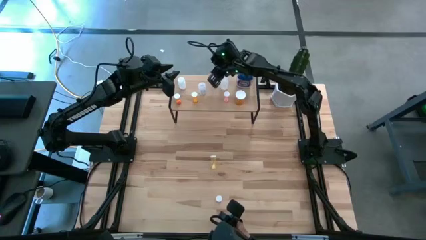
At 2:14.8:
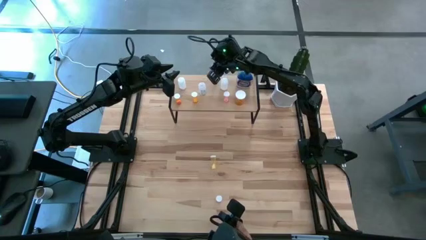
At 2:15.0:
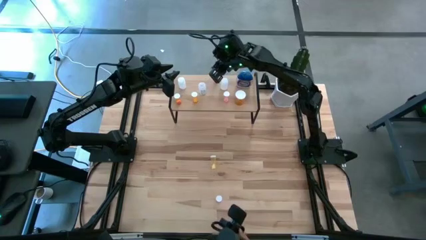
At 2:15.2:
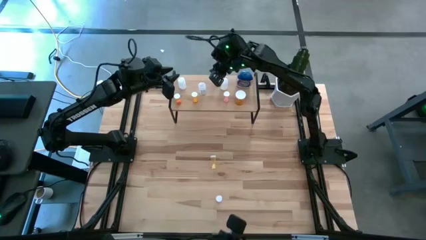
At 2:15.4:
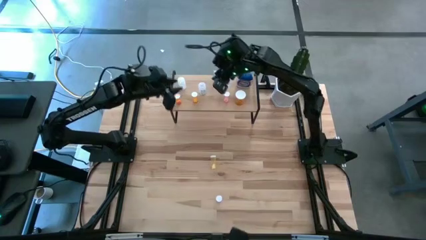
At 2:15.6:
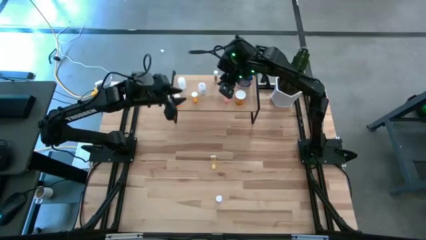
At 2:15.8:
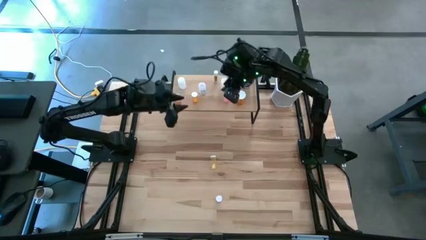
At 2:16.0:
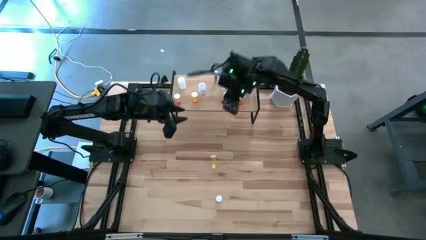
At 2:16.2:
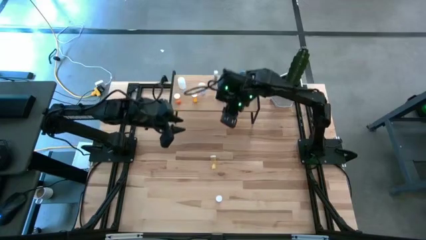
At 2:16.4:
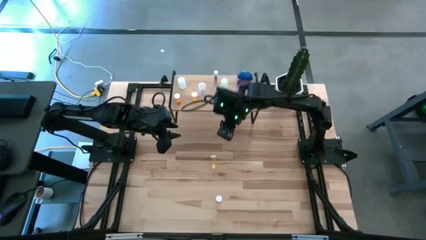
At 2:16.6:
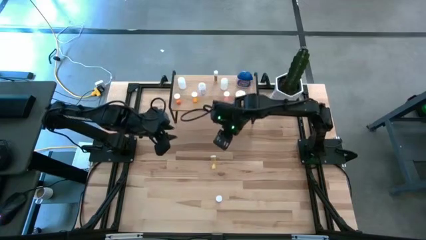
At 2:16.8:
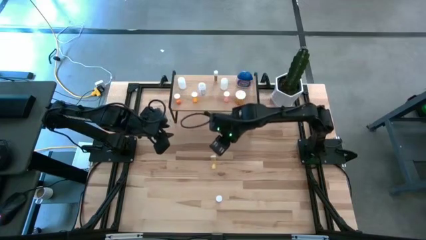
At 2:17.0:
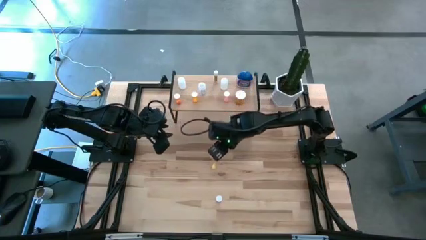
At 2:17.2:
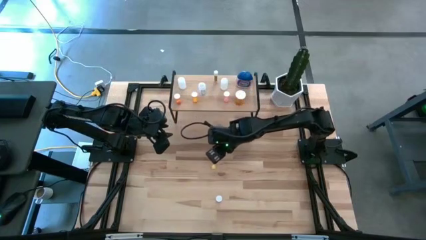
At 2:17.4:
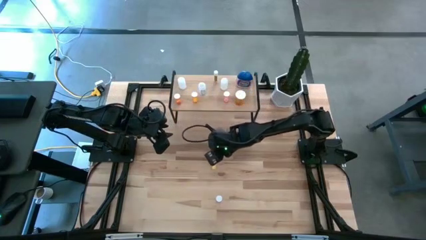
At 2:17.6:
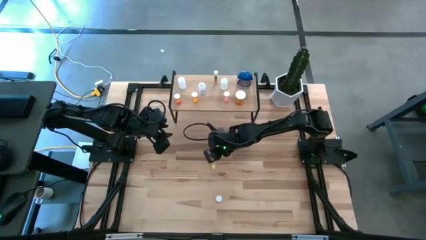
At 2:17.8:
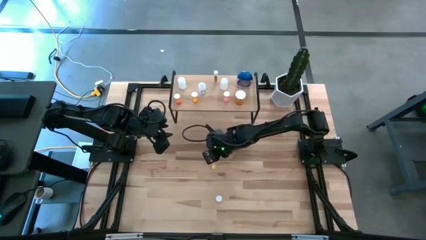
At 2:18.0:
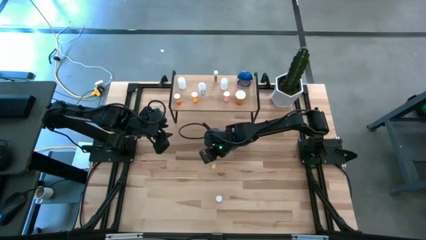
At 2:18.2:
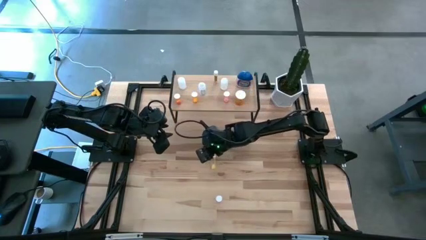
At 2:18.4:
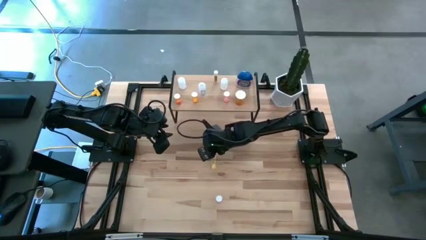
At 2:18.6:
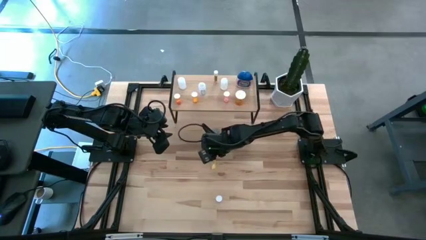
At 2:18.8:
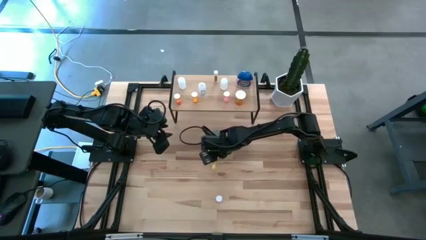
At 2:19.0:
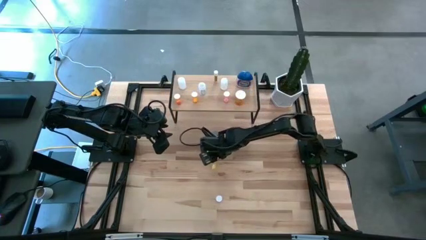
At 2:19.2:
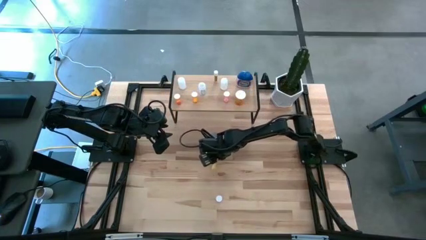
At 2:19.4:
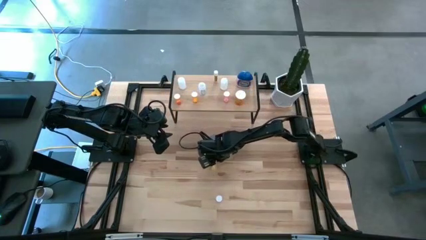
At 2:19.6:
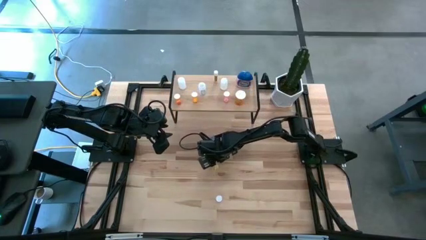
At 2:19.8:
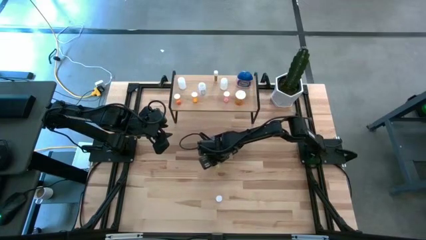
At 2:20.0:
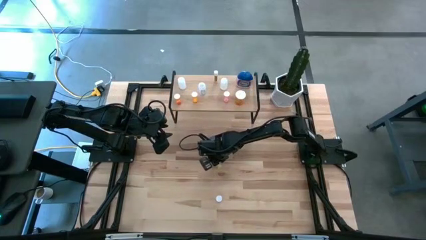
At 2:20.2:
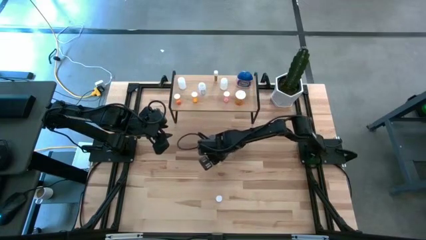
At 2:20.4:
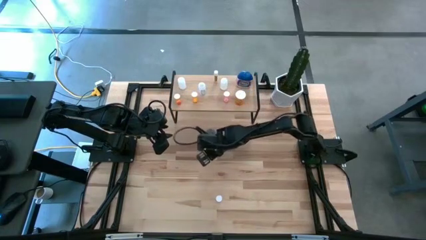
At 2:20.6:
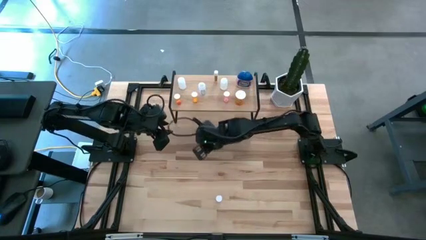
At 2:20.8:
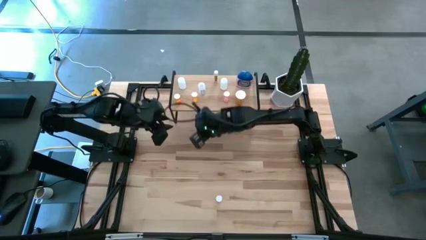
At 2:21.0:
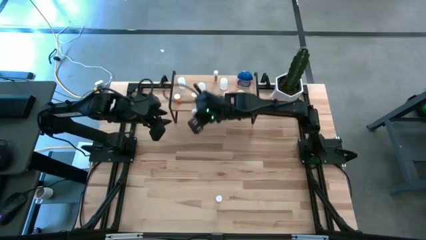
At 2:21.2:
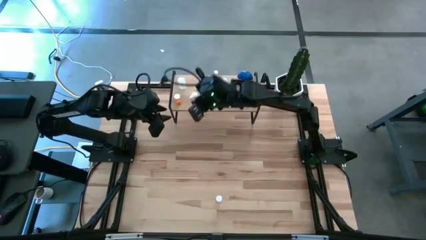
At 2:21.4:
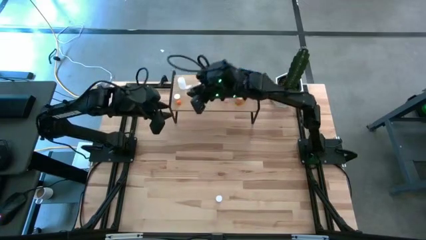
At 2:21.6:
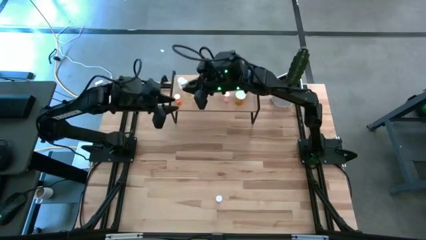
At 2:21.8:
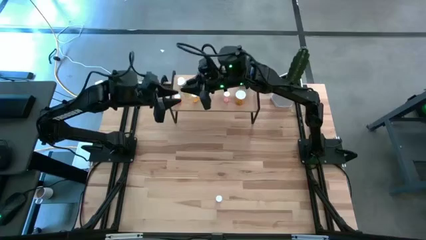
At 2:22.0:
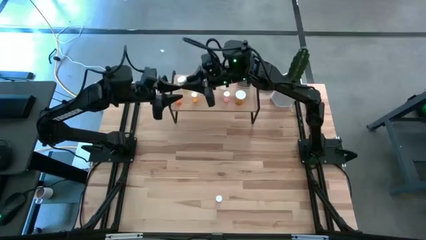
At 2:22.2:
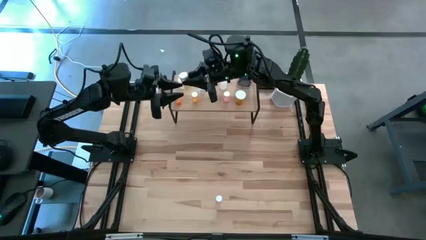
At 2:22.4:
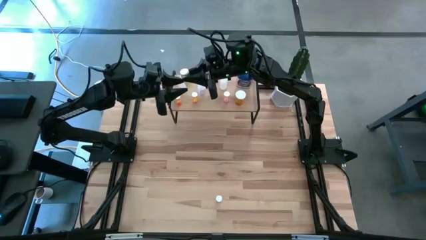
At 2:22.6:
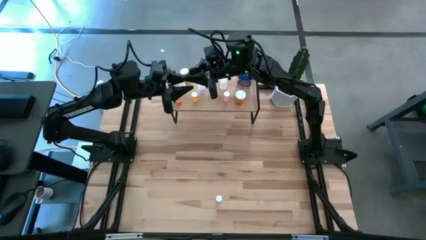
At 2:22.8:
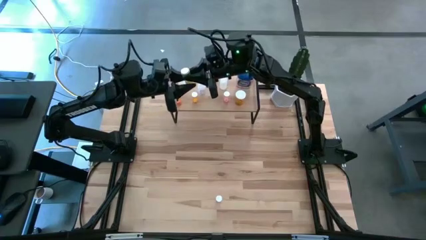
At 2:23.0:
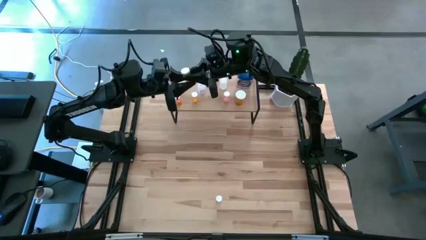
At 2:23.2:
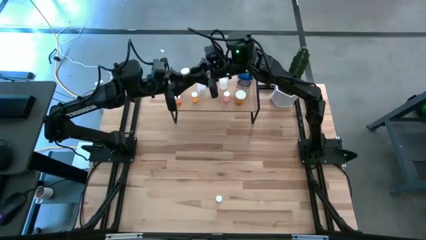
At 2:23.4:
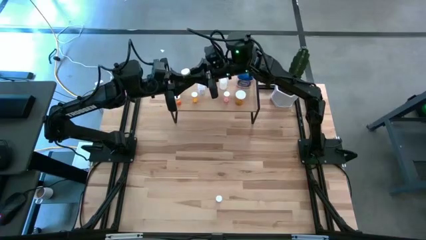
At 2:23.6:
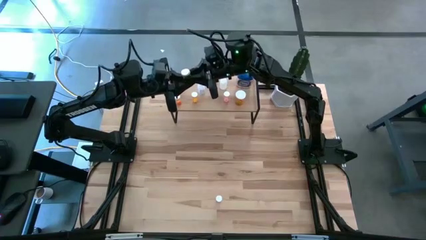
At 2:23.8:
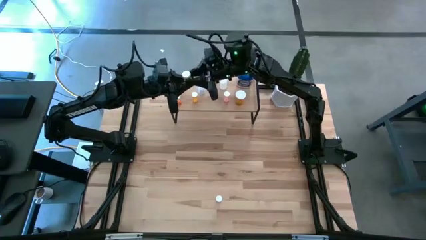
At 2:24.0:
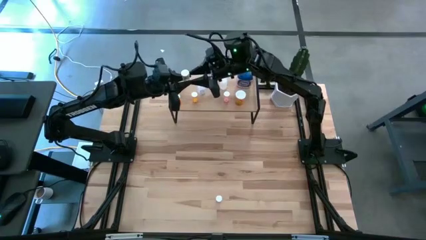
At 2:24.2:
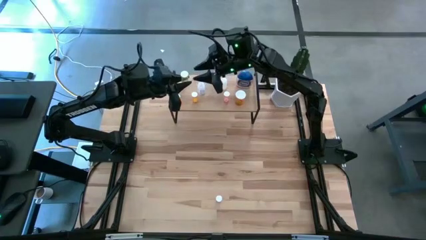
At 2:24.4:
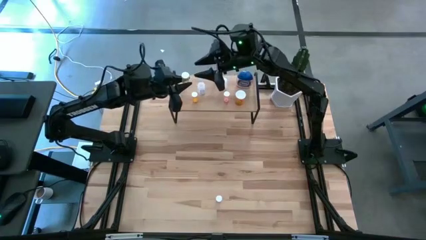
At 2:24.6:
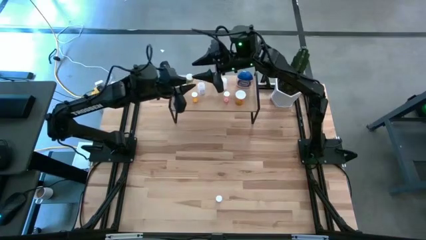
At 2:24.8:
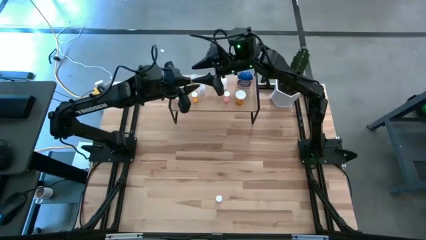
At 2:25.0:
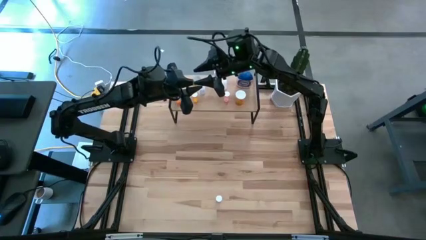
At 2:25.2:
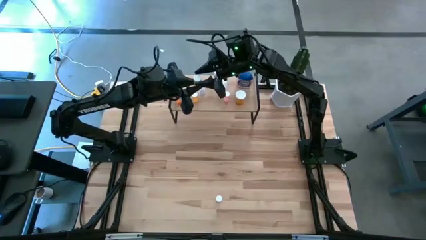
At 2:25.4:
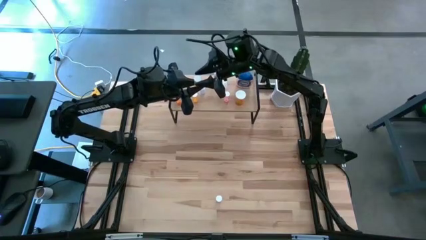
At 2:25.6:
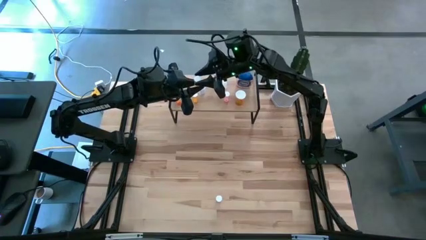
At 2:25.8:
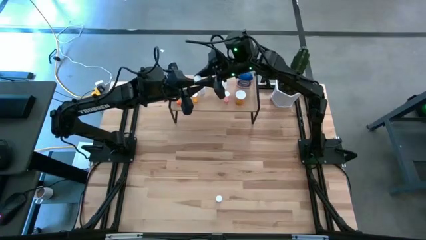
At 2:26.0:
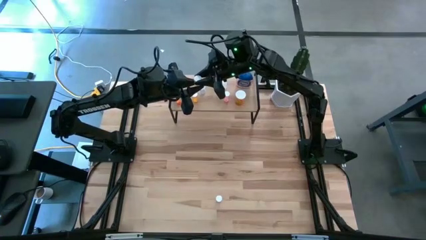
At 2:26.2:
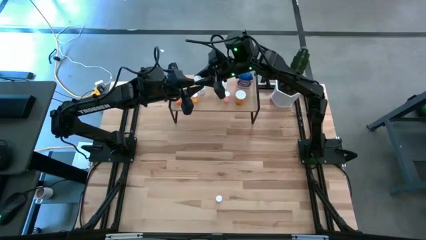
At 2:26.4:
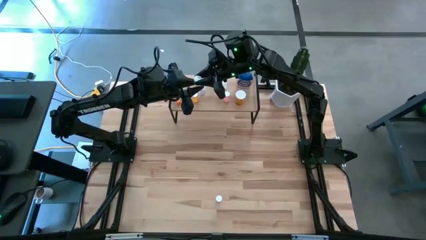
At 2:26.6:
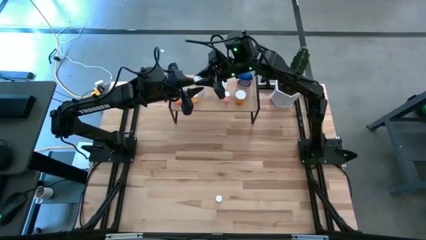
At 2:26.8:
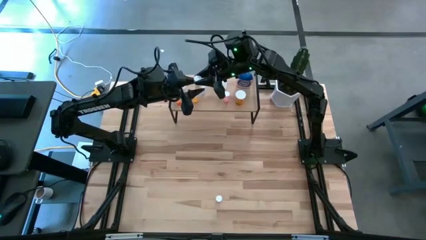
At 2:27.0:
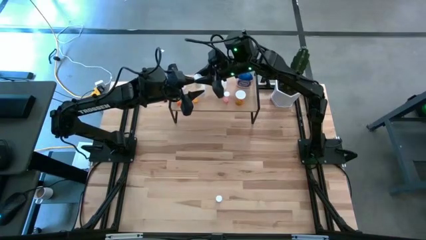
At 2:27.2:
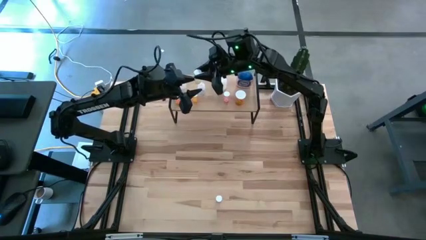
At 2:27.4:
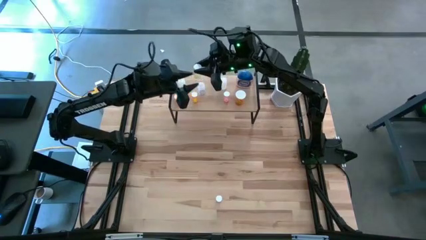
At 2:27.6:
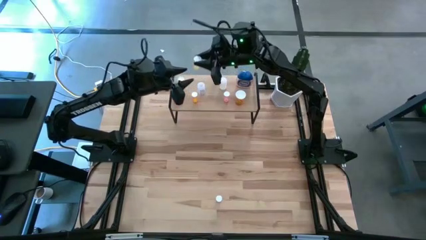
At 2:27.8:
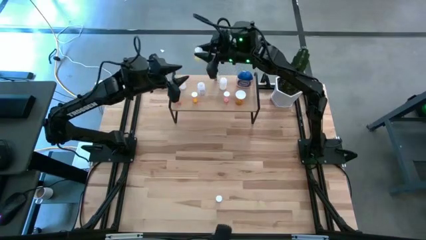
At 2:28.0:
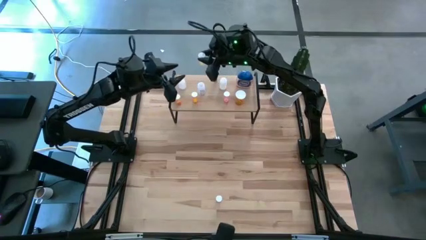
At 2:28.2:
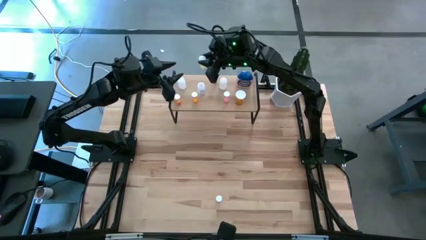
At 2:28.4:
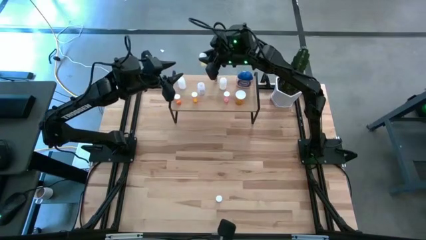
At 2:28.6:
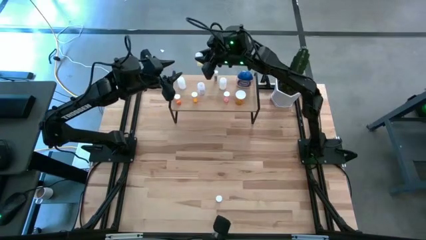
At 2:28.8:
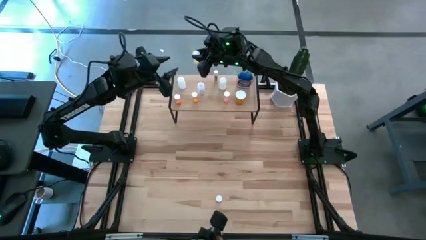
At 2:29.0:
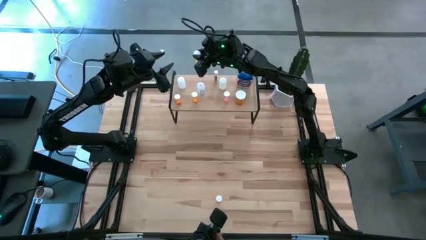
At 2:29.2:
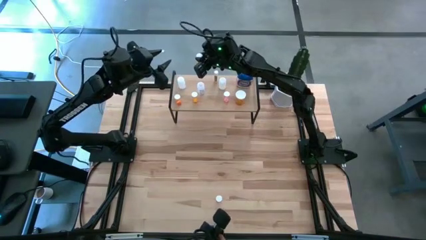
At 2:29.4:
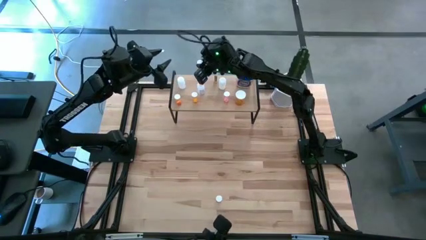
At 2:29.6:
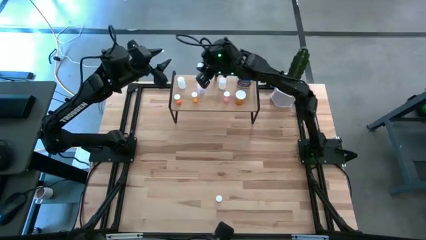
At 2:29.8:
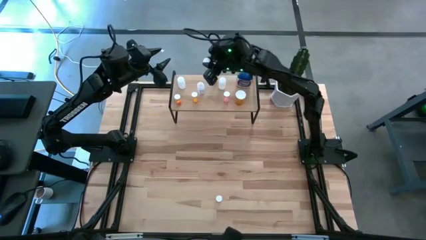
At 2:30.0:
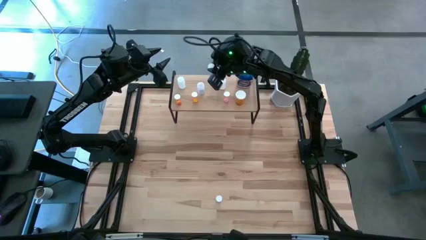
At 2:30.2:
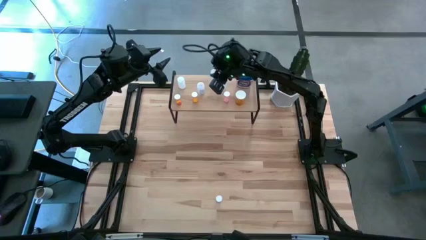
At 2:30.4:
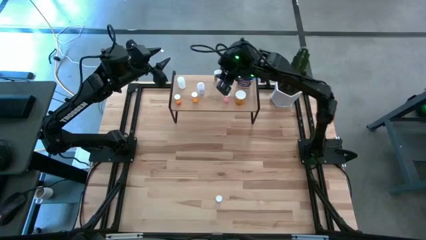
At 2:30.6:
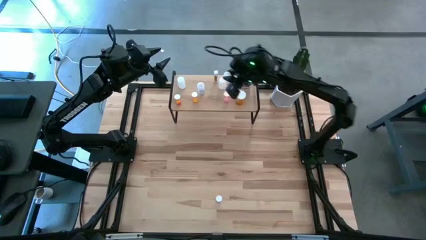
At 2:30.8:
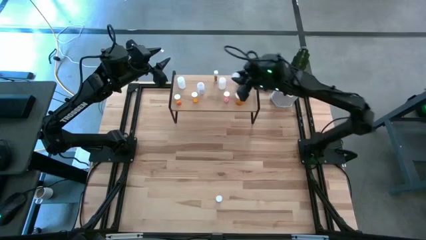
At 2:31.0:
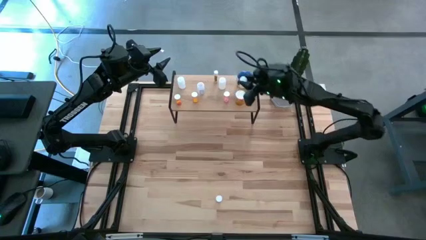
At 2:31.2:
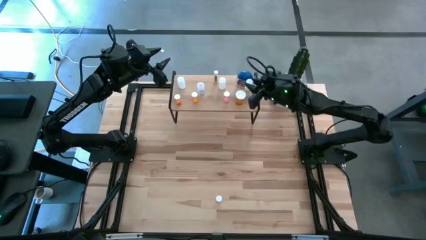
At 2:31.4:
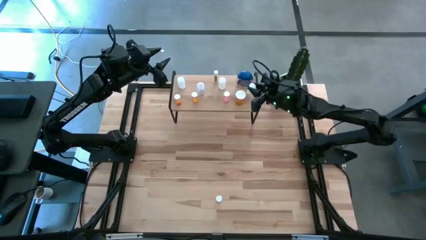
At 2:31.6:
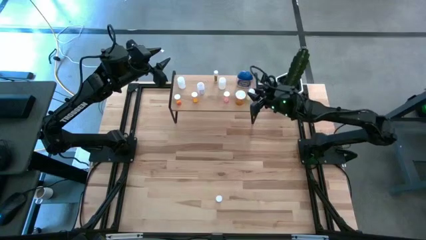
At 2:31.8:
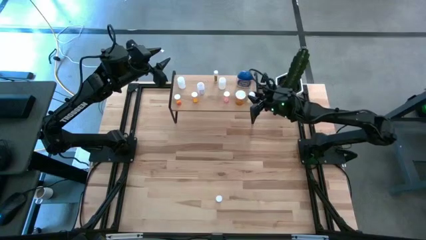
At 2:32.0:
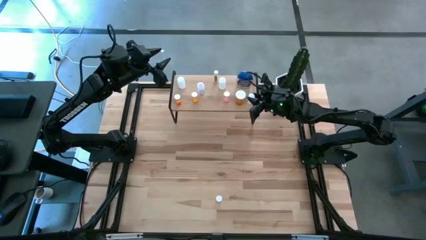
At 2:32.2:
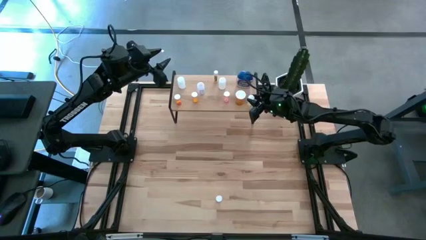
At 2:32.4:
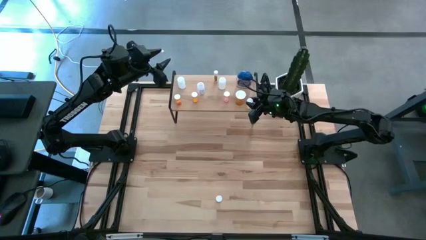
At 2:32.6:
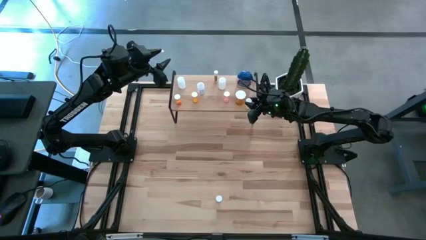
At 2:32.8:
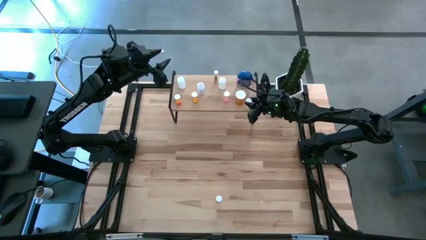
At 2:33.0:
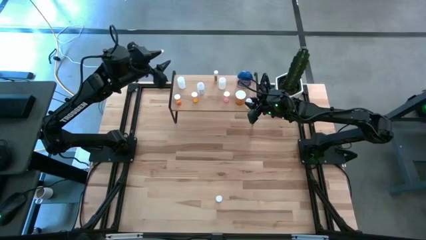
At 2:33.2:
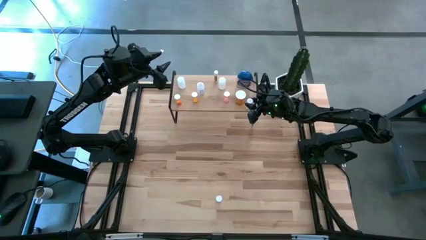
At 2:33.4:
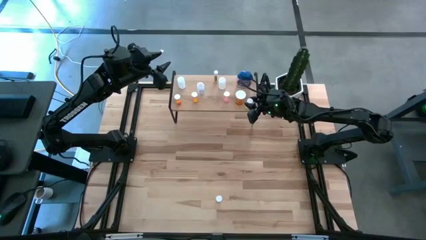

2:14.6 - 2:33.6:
Task: Pick and place medicine bottles onto shelf by color
Put the yellow pill bottle on the shelf
